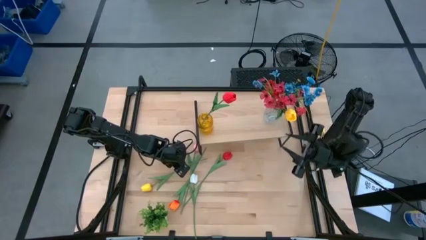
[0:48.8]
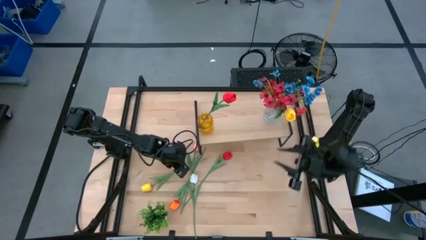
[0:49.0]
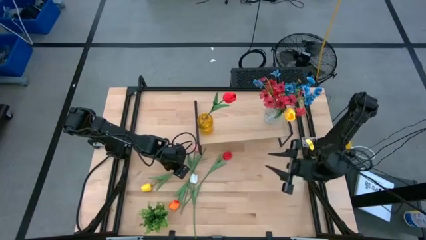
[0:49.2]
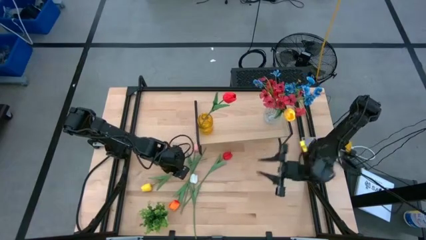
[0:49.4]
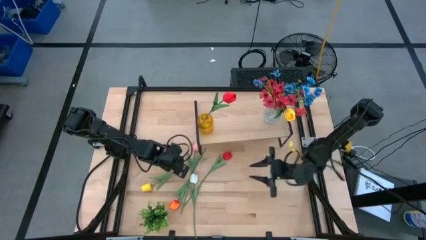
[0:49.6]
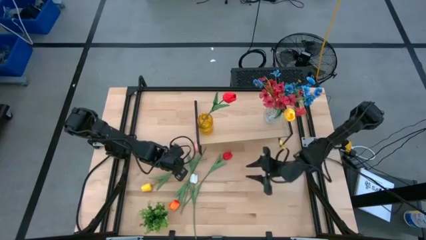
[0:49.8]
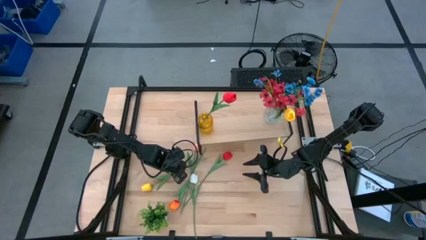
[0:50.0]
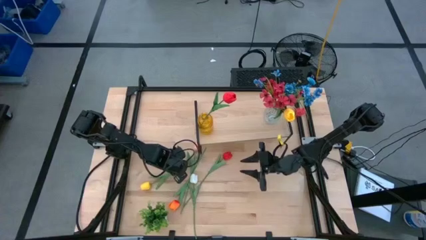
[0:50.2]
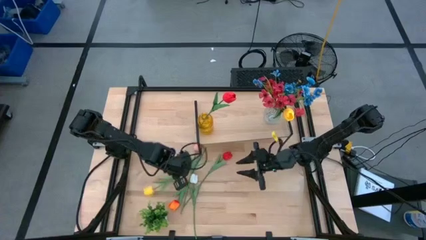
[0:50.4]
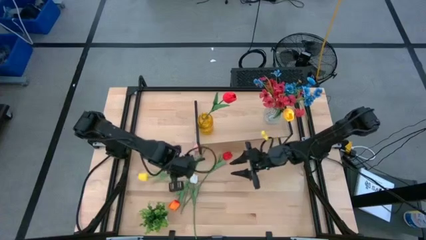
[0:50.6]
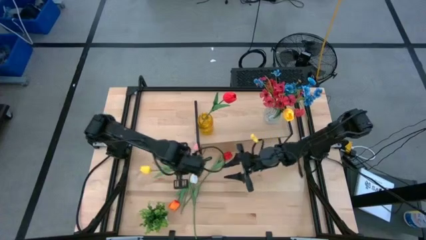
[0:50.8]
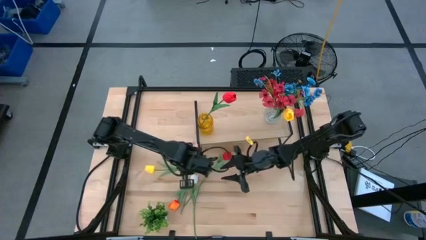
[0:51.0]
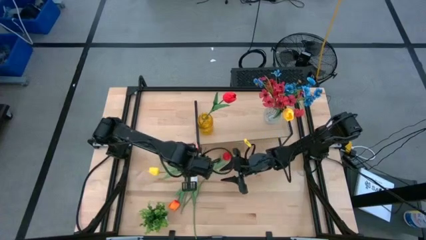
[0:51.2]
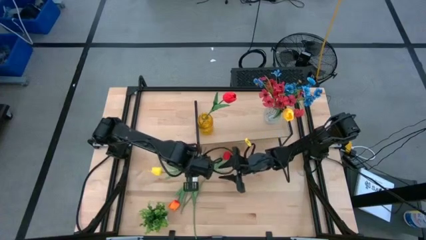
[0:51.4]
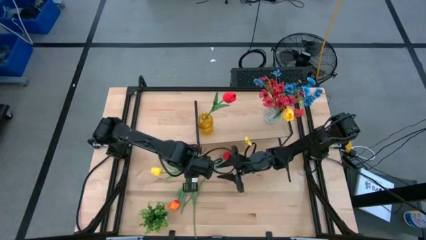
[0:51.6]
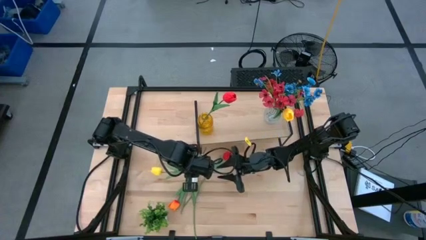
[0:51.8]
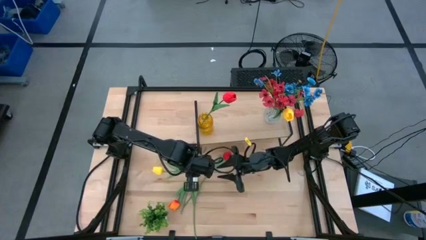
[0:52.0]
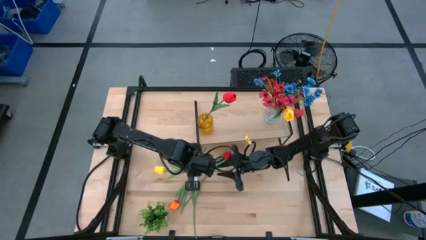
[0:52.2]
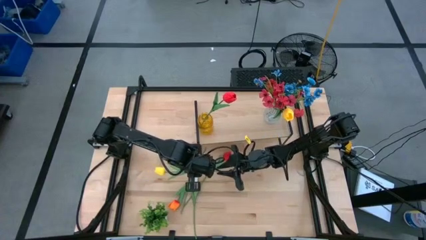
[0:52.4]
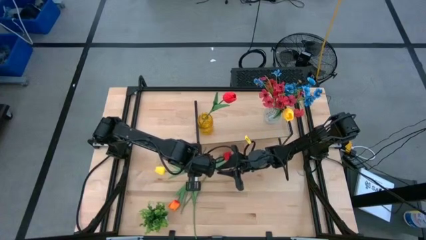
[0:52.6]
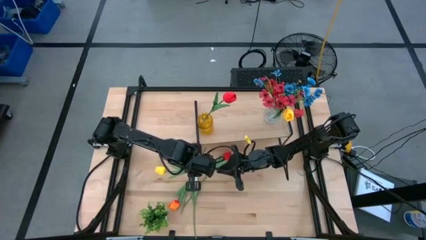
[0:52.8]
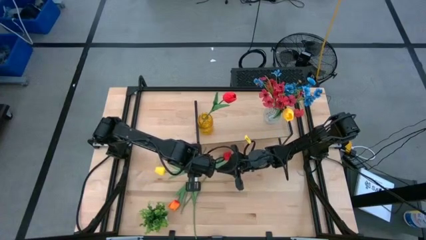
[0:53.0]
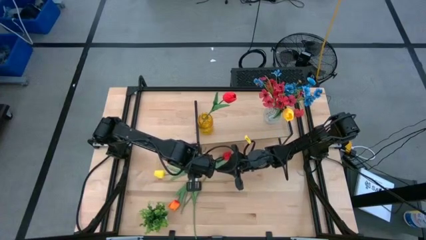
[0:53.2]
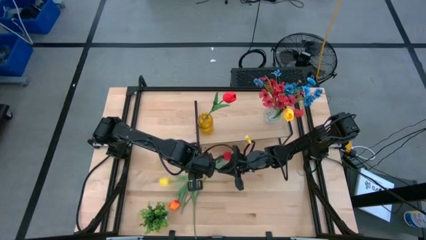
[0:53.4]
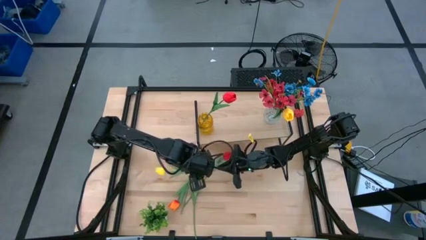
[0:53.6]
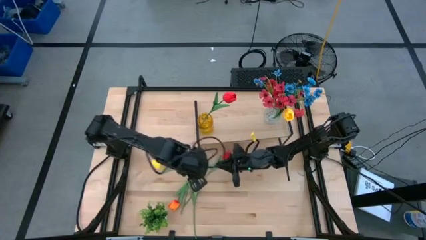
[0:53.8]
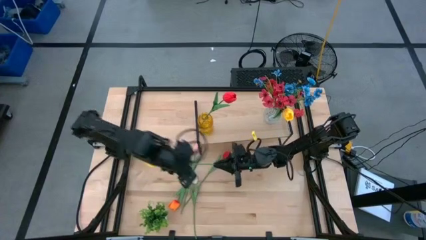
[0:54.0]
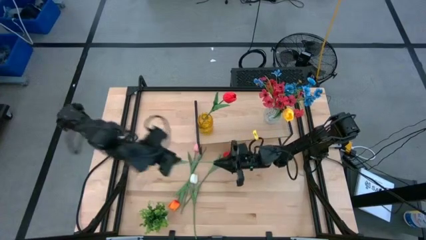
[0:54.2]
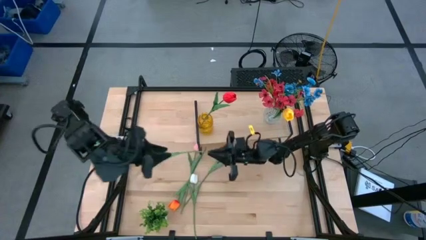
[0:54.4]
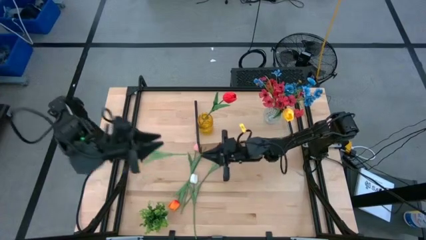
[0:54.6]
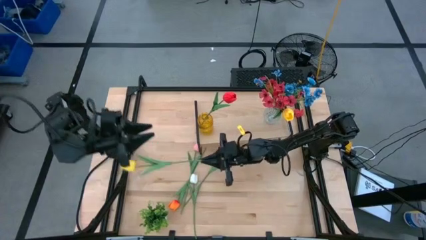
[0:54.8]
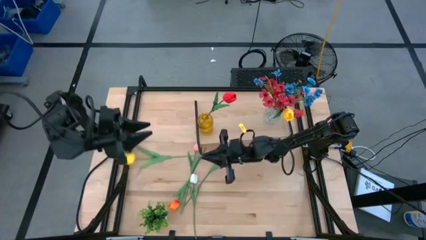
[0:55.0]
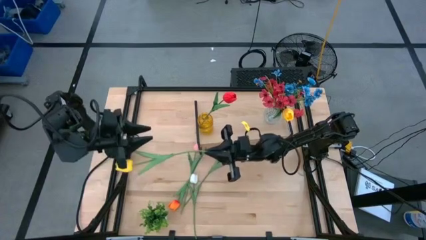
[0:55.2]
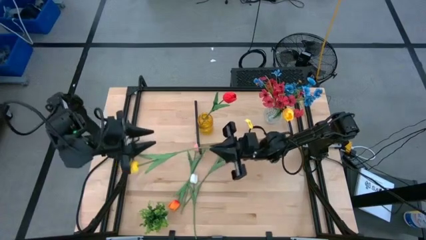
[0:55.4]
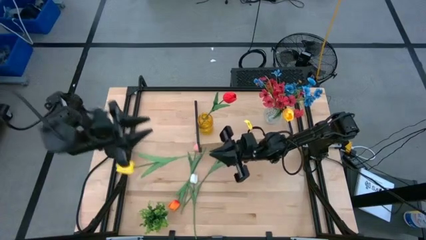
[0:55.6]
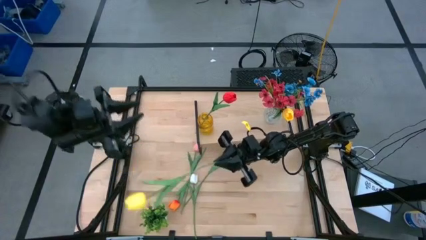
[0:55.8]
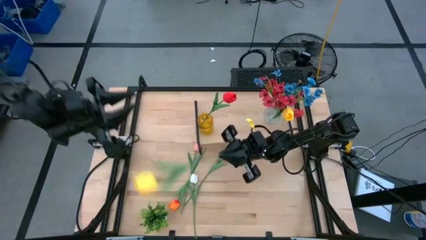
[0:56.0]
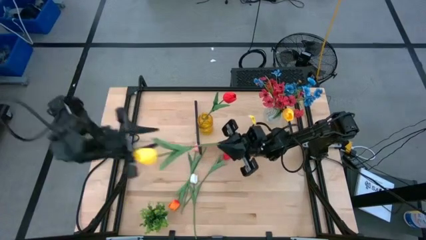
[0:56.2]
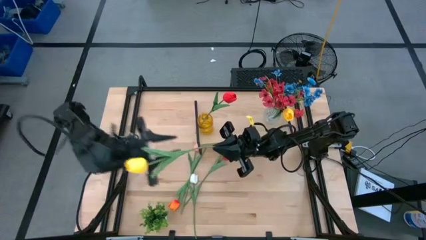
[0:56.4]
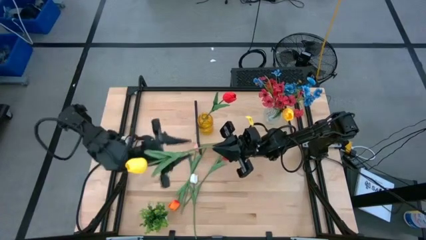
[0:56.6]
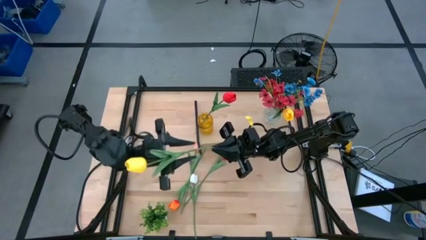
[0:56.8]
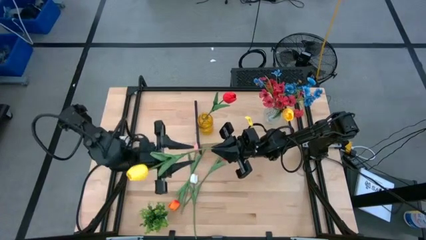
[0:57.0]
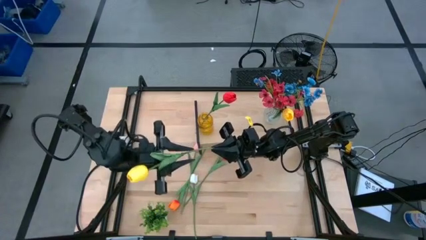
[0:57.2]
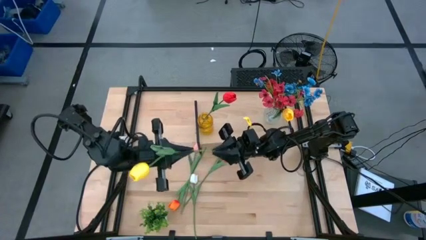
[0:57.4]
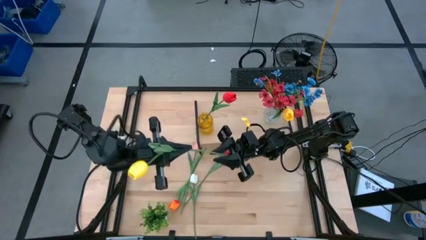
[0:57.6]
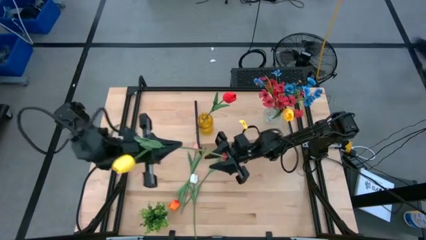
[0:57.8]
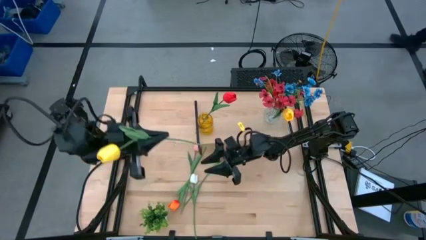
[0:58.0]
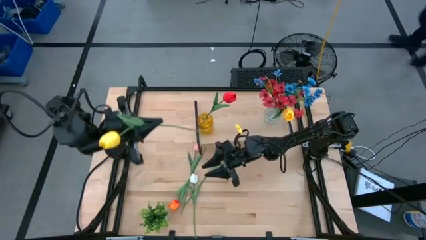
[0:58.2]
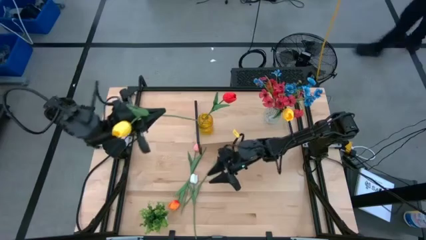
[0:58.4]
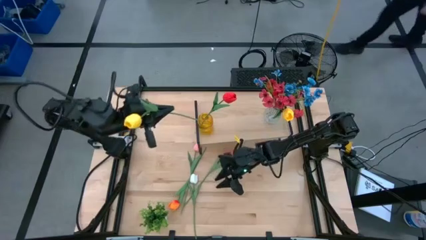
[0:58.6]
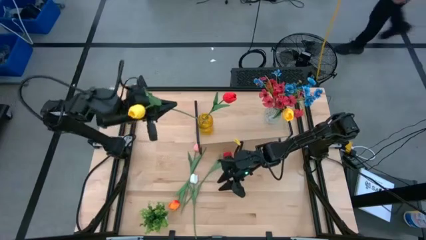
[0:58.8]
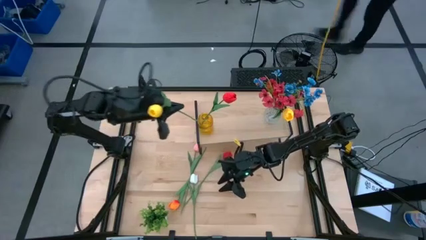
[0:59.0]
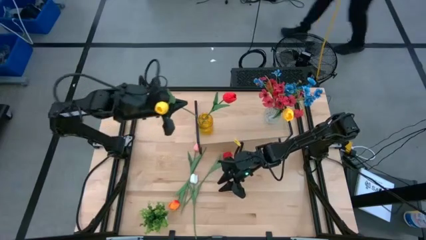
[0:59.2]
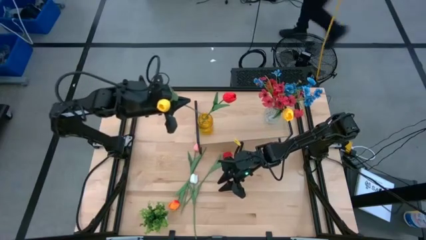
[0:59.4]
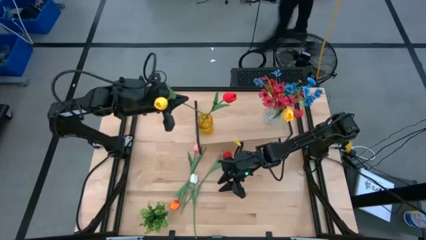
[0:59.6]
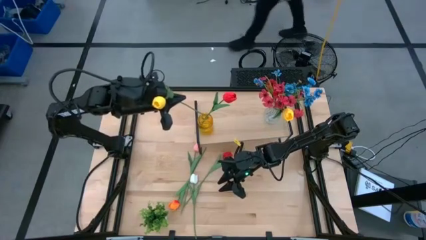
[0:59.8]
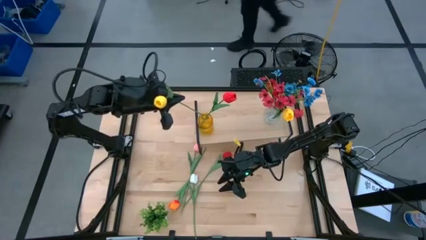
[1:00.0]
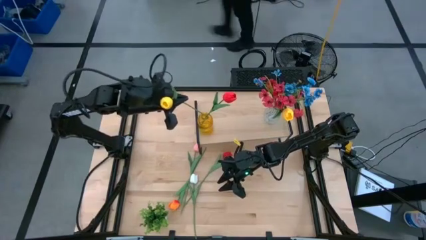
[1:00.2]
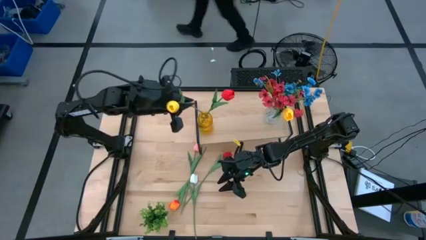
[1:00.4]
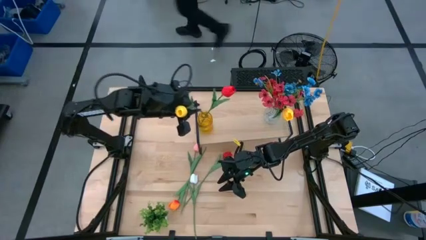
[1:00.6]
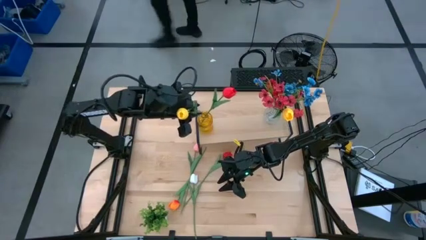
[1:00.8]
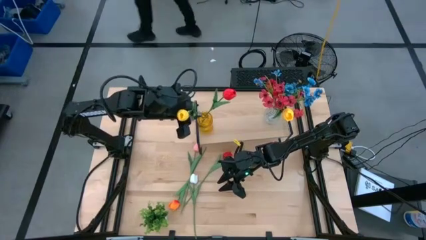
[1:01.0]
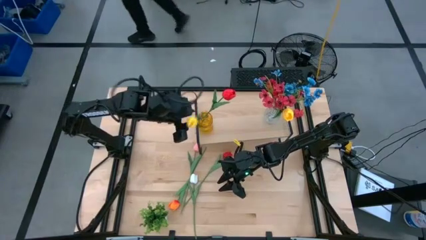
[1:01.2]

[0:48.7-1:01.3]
Task: Pick and place flowers into a vace then onto a shelf
Put the yellow flower into the yellow vase

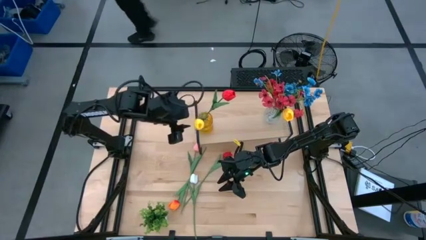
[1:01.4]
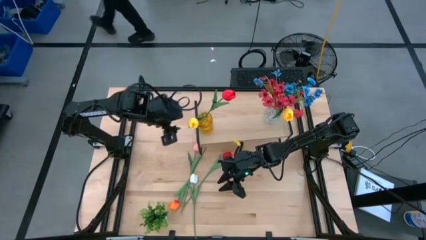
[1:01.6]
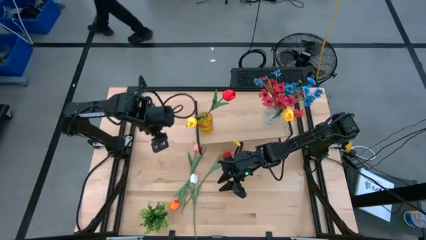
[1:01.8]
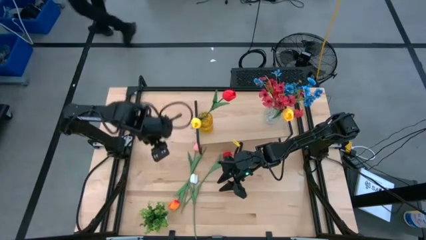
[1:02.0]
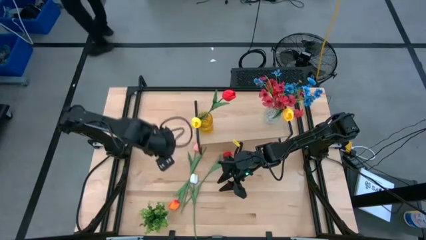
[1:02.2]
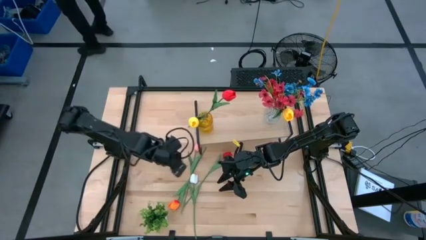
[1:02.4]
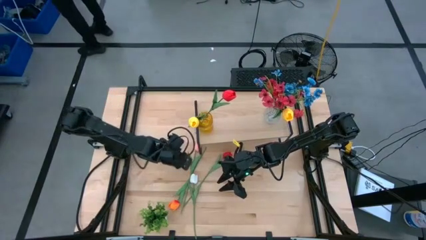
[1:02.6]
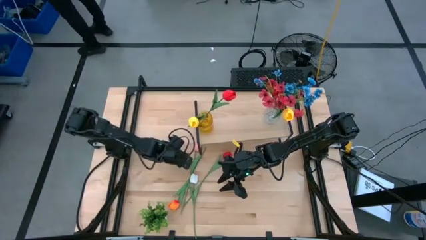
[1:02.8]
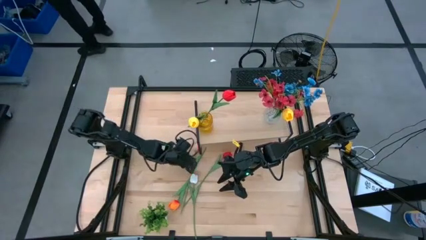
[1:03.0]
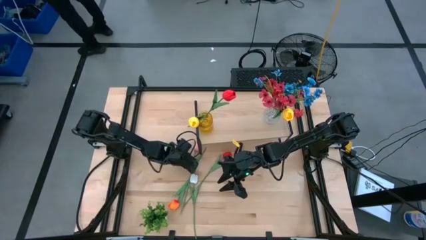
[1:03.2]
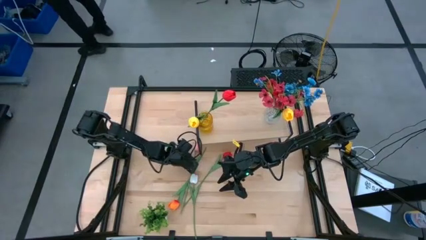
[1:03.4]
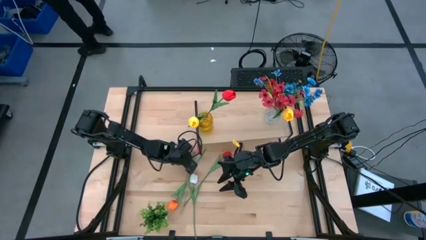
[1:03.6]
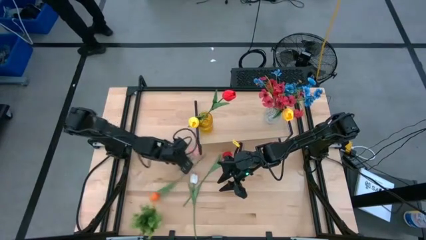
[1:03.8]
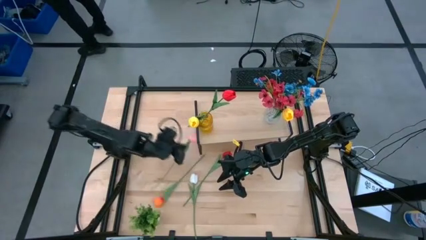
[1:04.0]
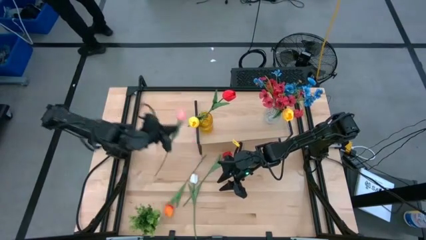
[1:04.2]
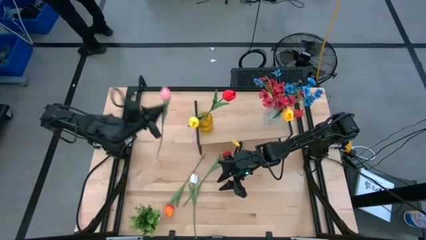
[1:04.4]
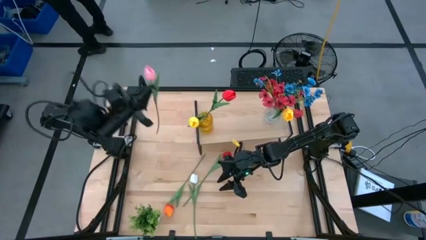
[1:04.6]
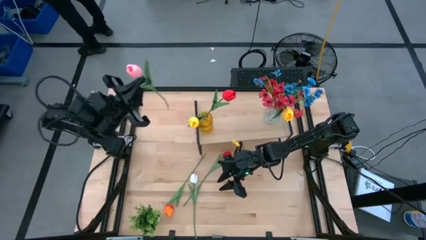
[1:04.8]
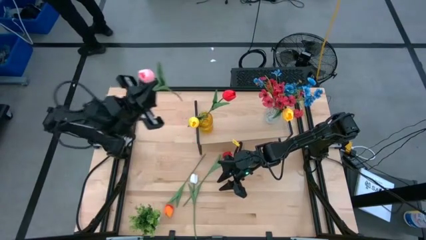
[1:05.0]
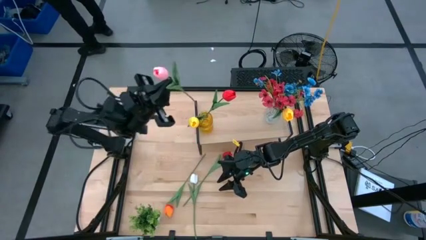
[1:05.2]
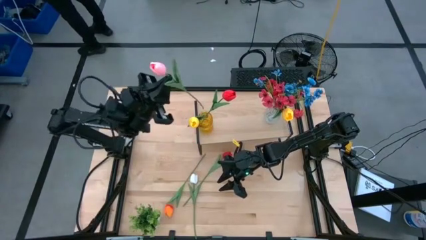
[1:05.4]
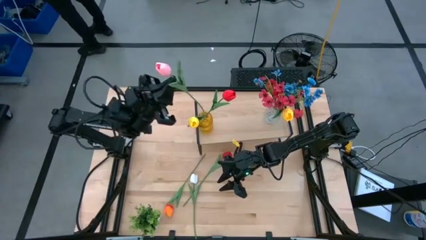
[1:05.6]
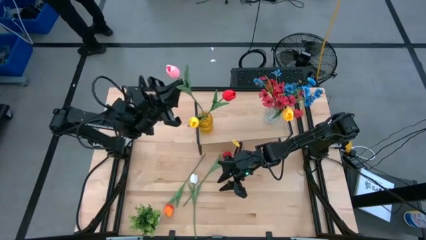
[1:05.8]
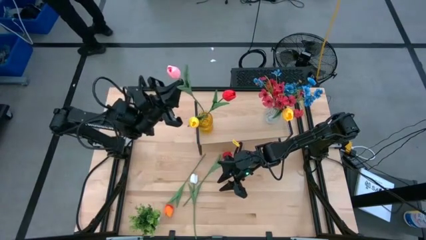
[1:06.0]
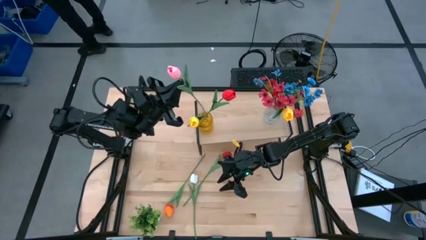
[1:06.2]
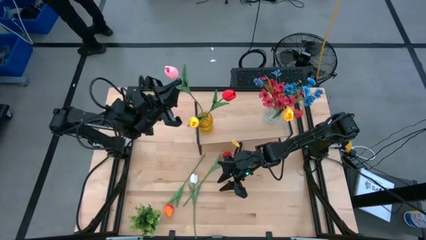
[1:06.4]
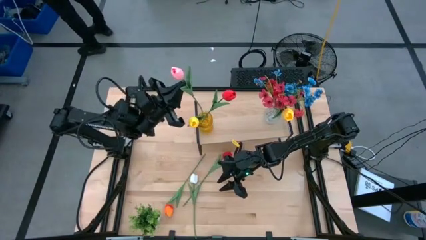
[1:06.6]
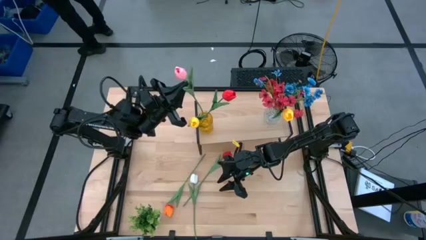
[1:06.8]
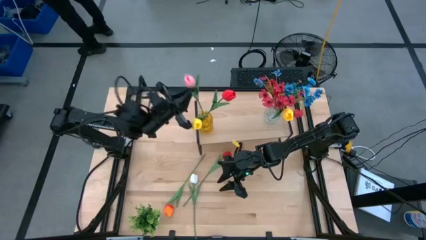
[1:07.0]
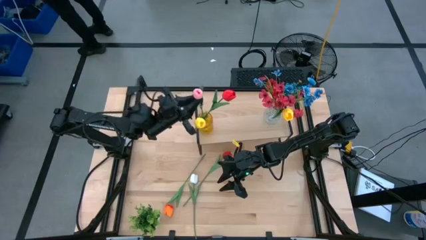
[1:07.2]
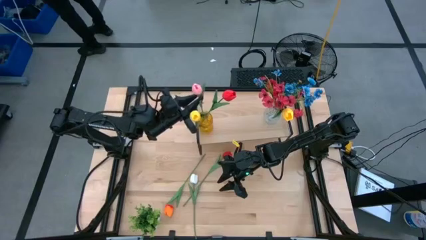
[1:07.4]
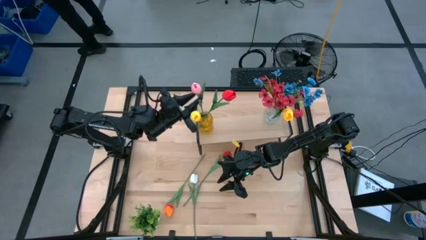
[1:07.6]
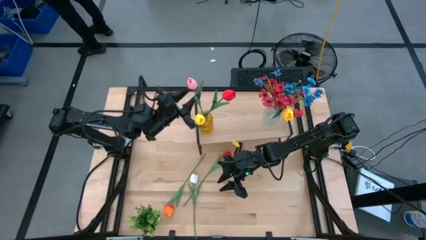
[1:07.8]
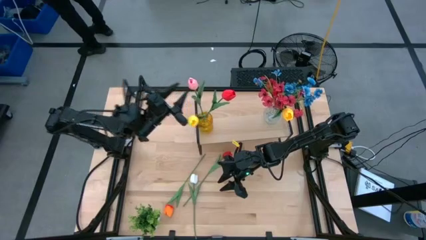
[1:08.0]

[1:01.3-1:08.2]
Put the pink flower into the yellow vase
